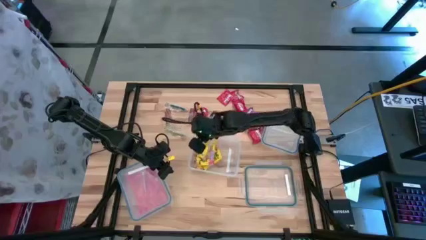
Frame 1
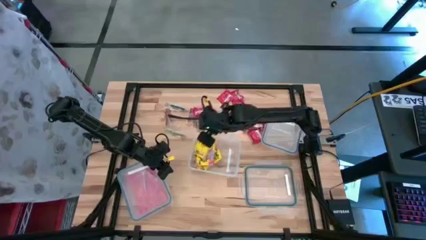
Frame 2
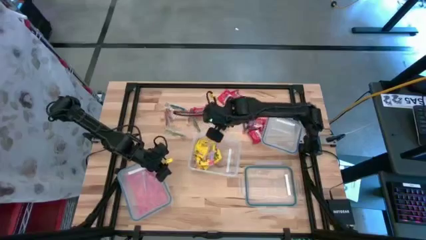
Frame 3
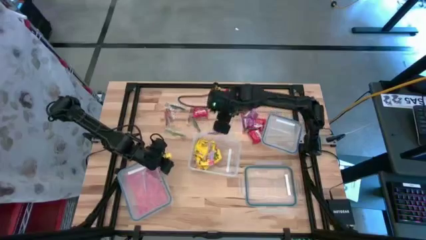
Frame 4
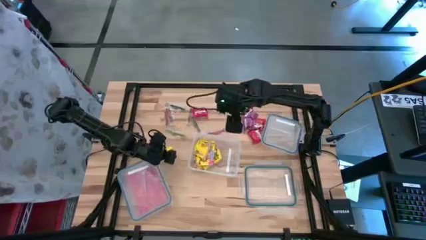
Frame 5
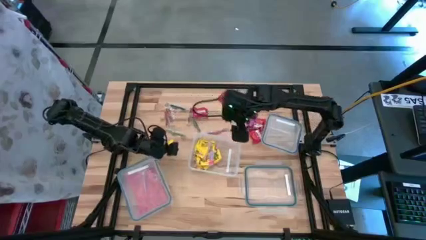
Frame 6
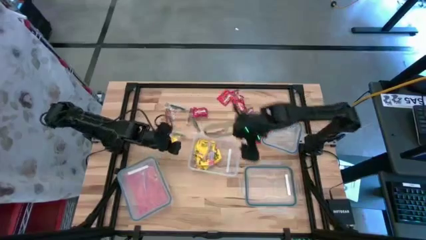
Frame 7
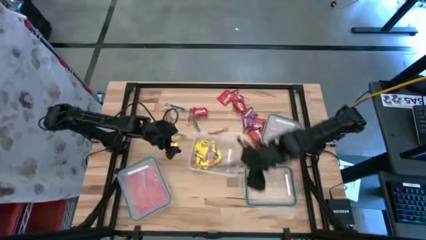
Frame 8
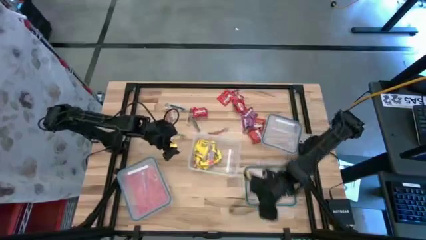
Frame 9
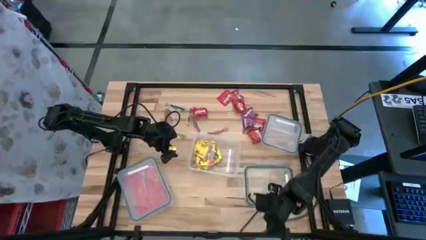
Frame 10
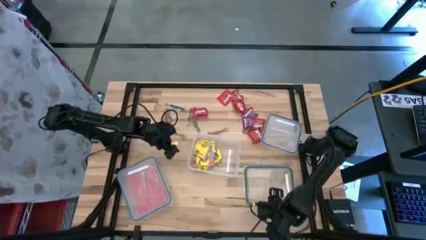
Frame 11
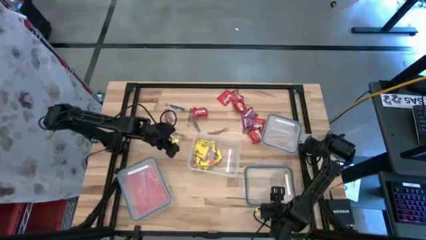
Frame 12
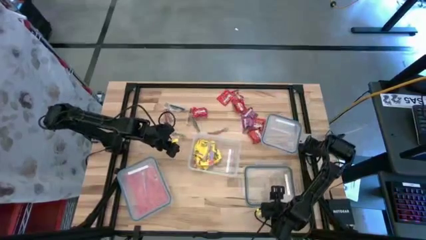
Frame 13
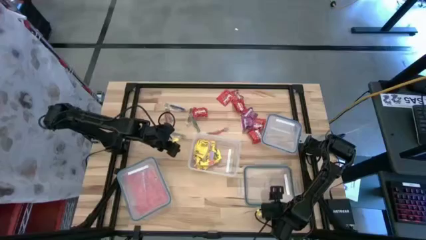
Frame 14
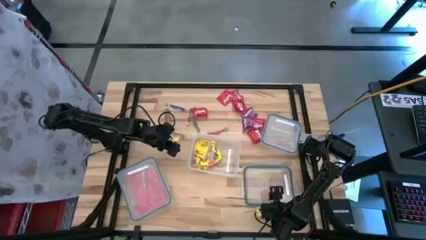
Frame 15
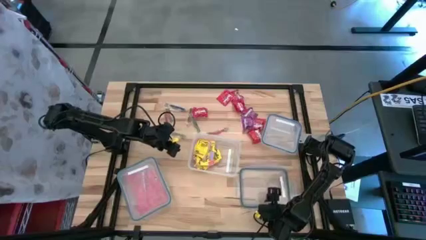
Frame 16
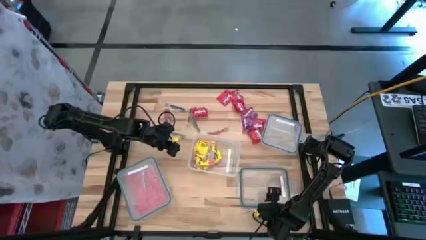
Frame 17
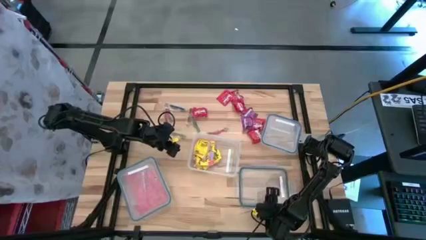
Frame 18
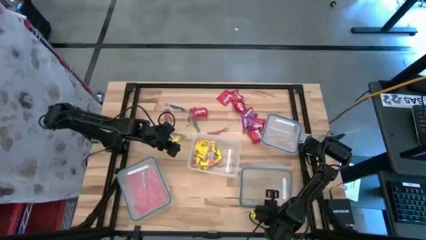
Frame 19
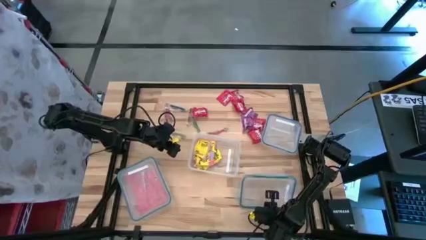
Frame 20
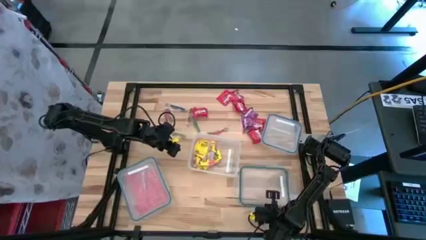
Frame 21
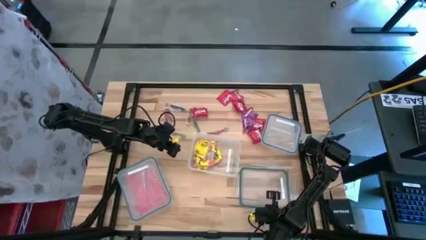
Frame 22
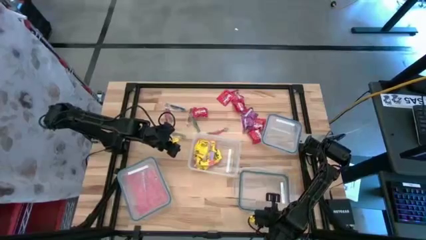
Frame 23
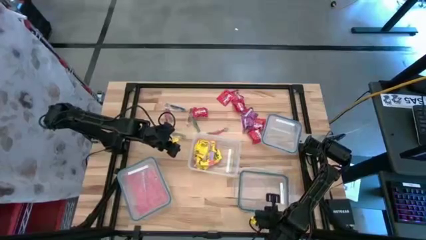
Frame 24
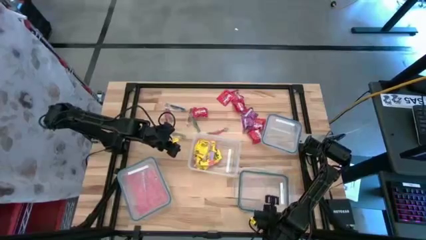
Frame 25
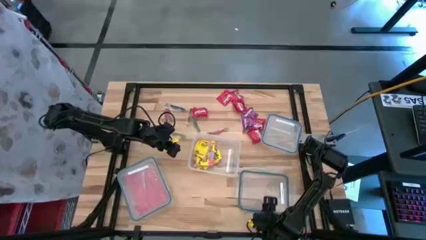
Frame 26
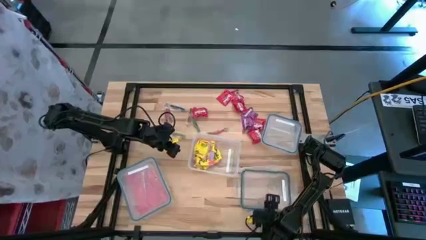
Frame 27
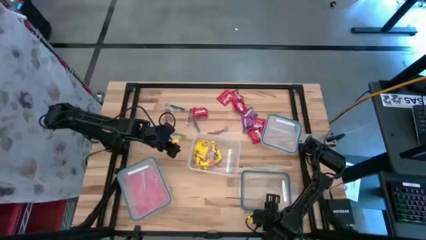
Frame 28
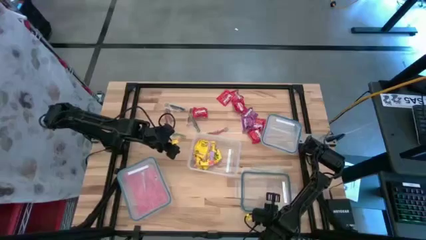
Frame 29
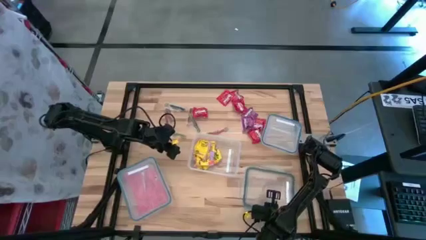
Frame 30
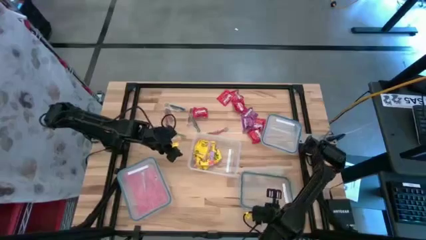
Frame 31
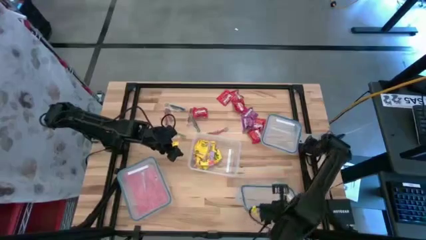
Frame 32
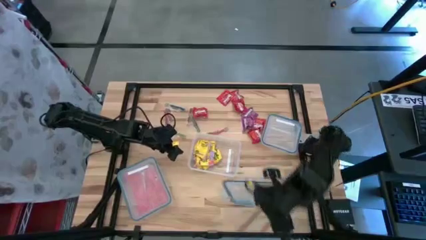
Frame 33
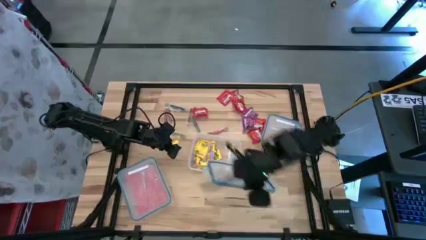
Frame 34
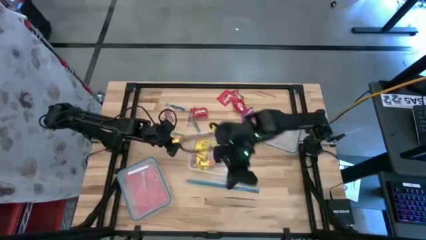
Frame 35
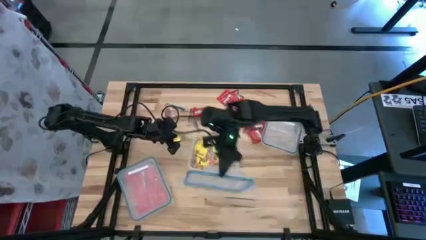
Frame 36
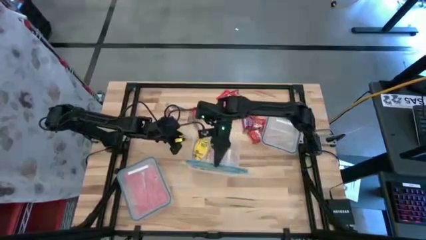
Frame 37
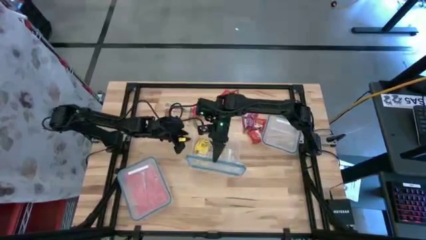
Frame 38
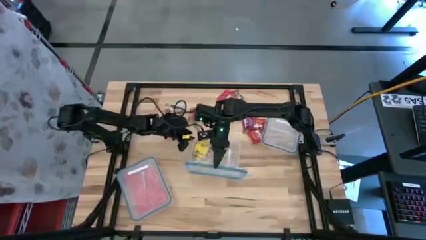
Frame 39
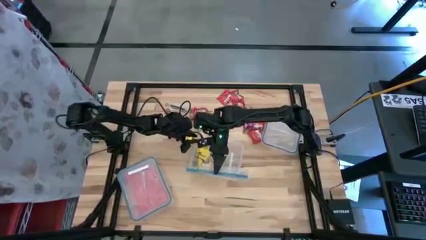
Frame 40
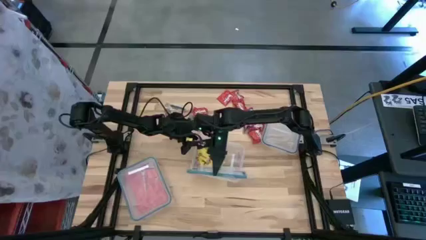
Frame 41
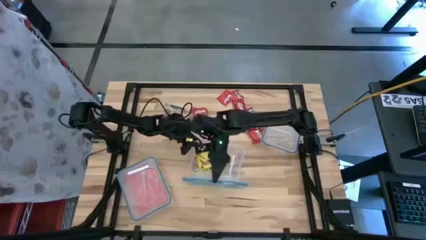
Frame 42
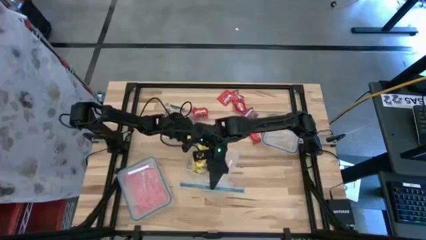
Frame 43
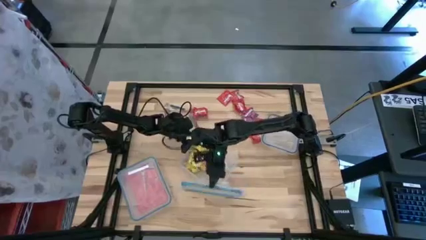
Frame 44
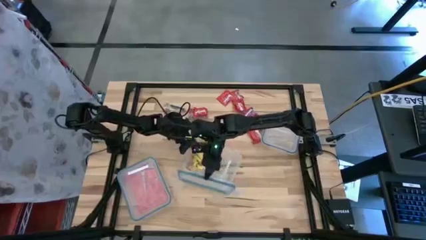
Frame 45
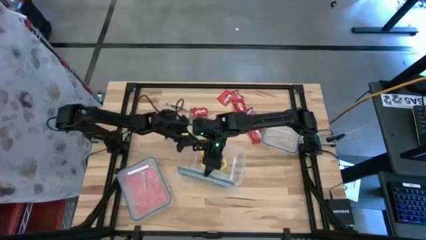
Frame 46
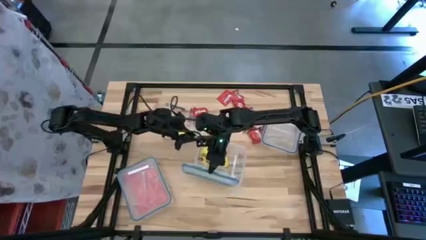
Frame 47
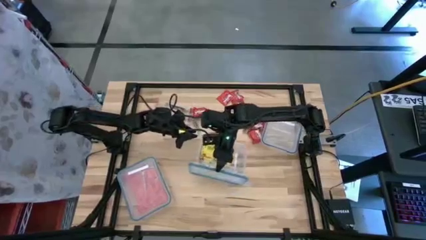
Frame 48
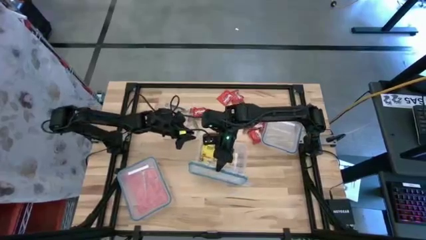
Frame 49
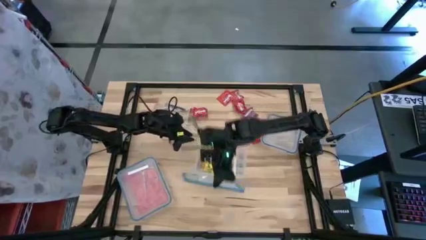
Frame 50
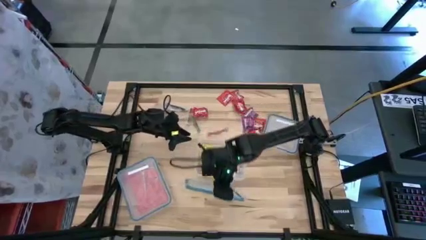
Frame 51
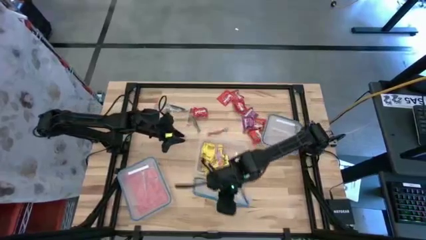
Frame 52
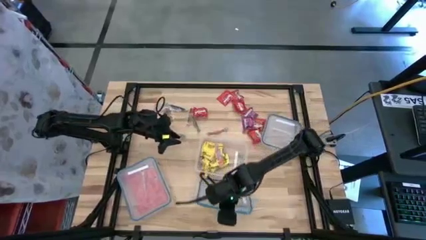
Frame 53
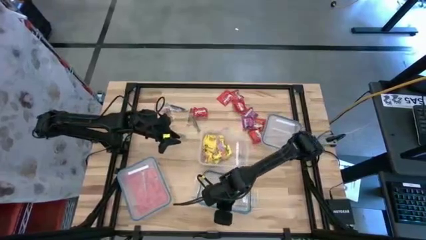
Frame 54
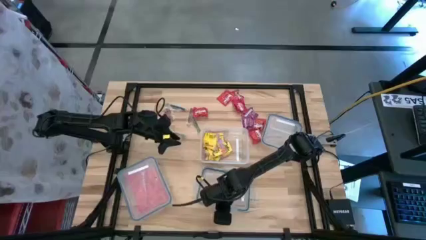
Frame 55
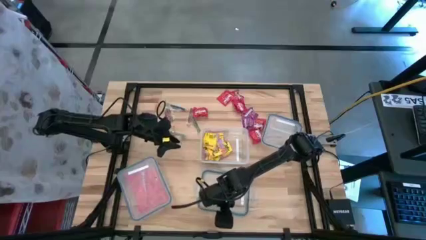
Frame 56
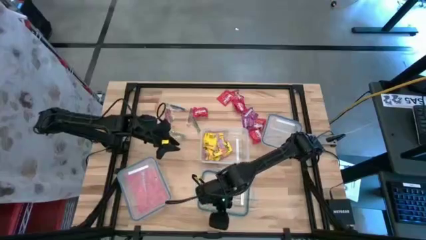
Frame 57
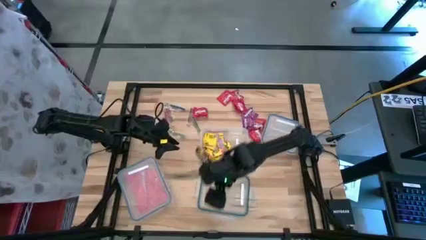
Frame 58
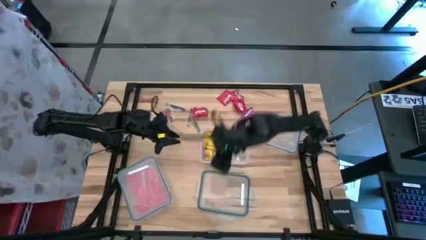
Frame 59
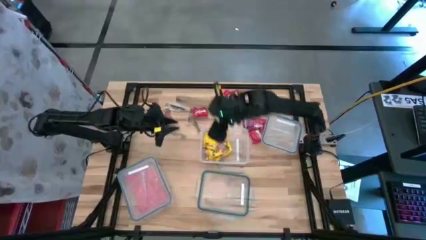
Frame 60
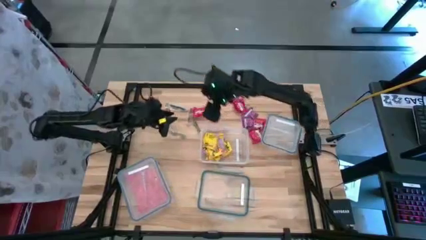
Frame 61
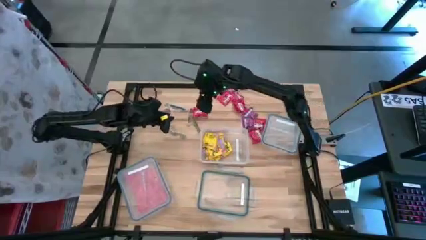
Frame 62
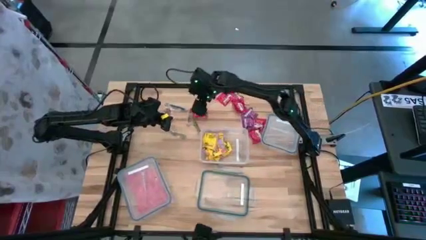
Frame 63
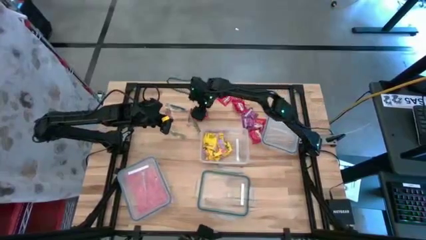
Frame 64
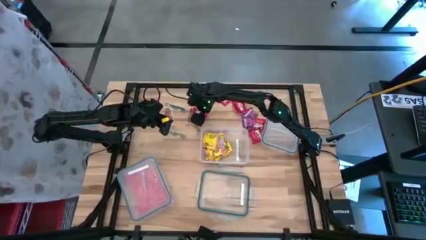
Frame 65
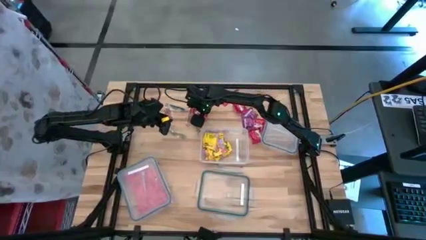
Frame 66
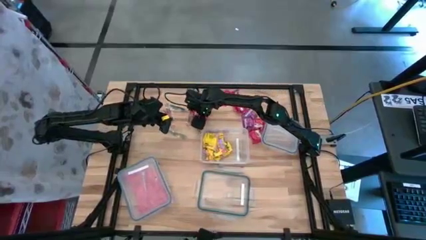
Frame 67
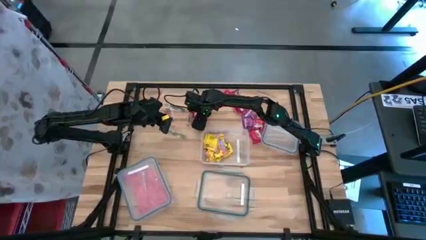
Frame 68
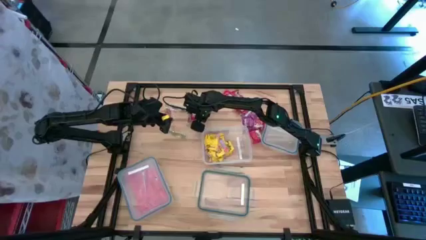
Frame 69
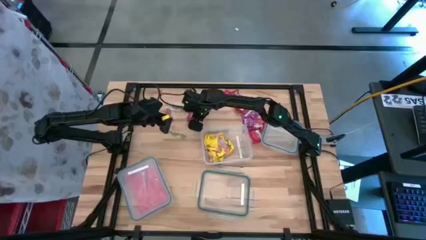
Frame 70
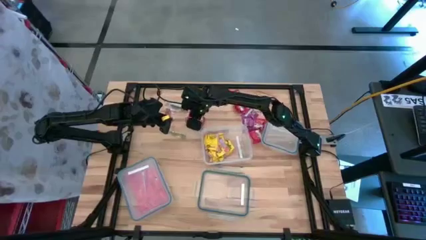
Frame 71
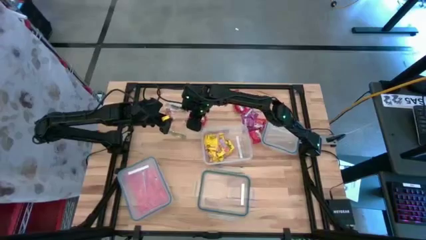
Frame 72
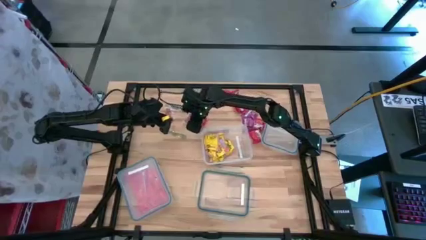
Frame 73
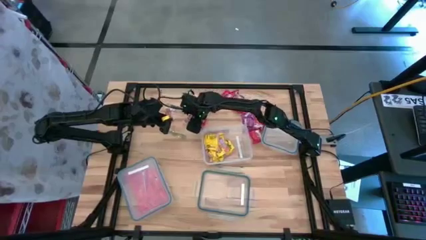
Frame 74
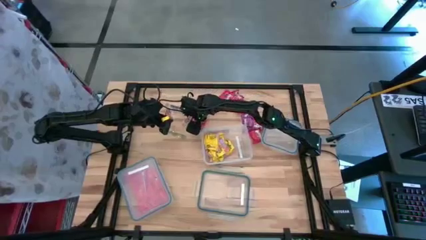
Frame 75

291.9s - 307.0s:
Task: Sort candy
Put the red candy into the rectangular transparent bin
